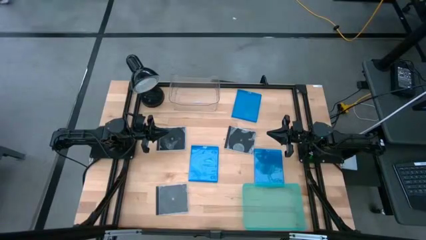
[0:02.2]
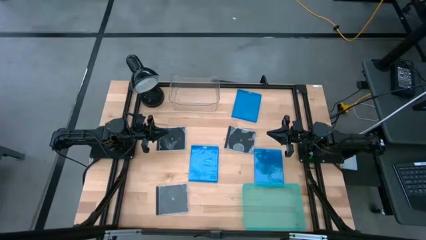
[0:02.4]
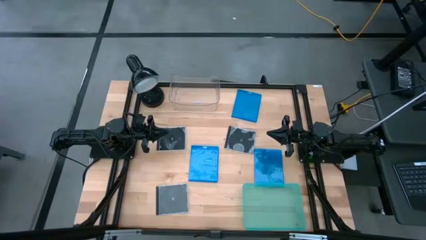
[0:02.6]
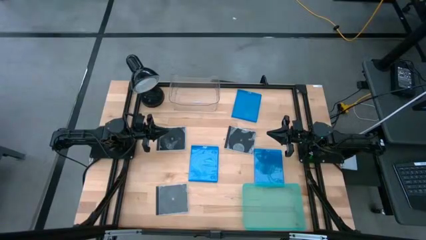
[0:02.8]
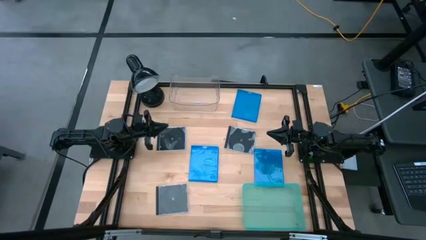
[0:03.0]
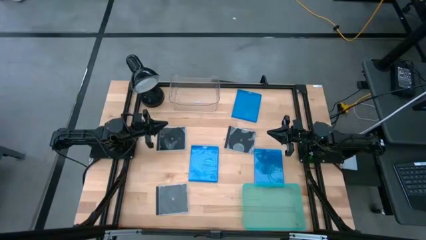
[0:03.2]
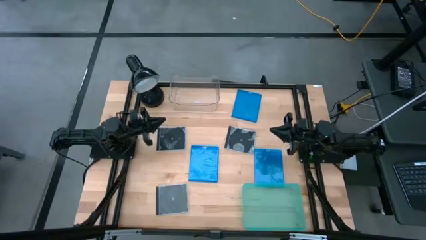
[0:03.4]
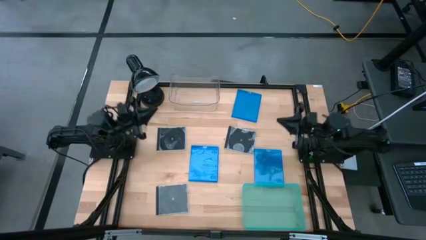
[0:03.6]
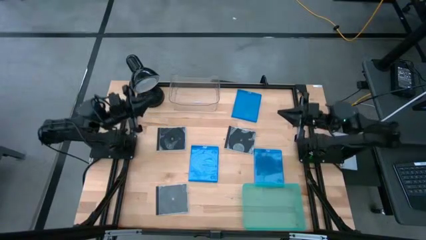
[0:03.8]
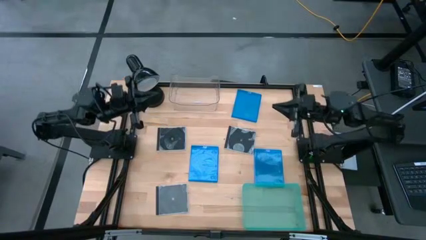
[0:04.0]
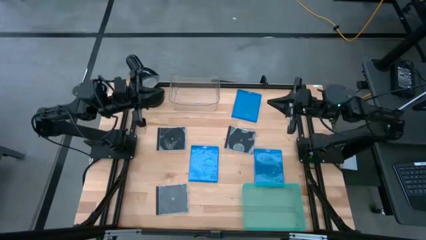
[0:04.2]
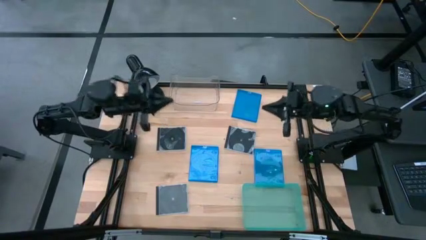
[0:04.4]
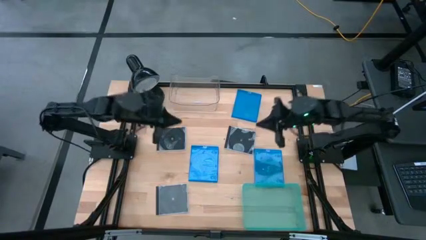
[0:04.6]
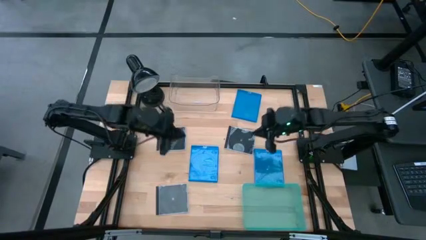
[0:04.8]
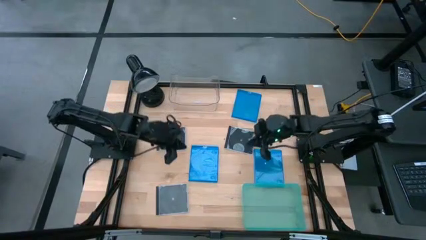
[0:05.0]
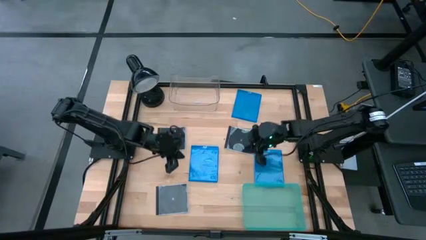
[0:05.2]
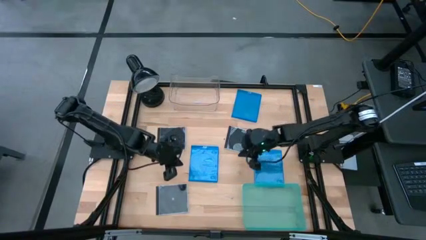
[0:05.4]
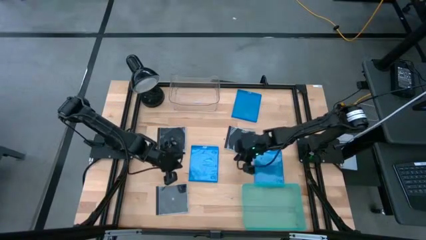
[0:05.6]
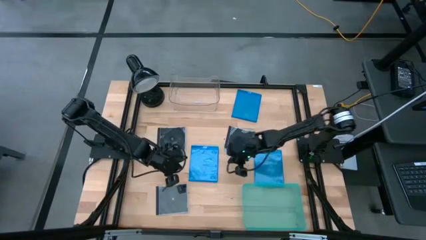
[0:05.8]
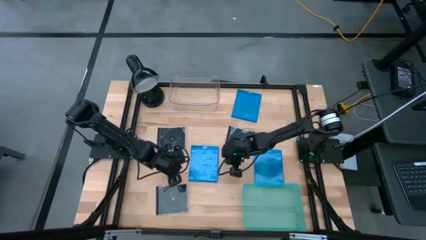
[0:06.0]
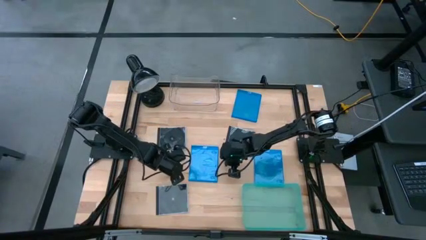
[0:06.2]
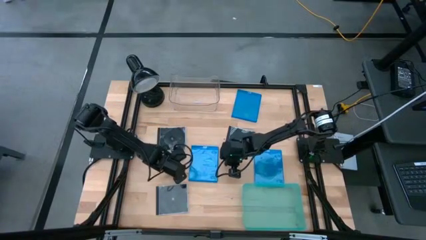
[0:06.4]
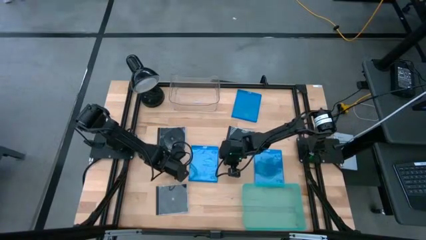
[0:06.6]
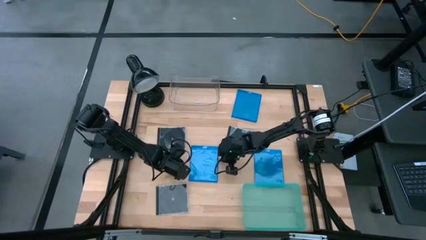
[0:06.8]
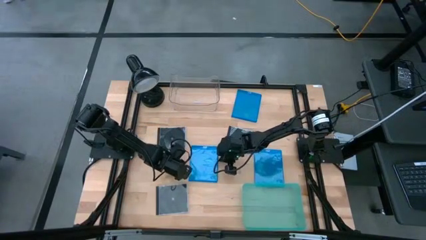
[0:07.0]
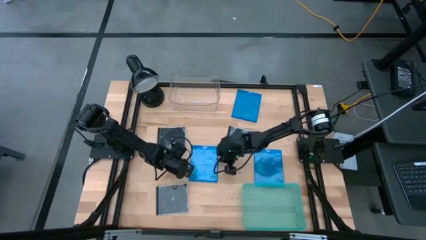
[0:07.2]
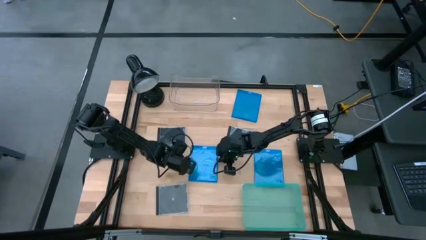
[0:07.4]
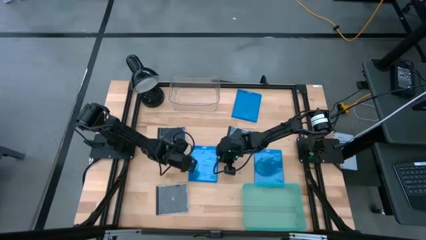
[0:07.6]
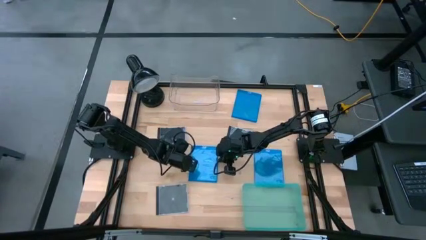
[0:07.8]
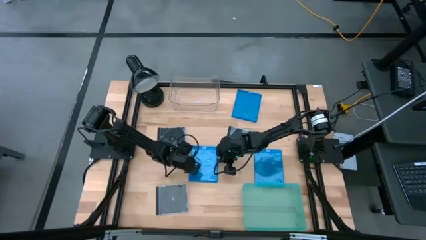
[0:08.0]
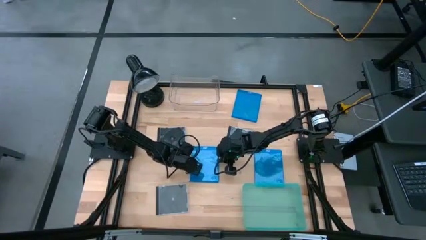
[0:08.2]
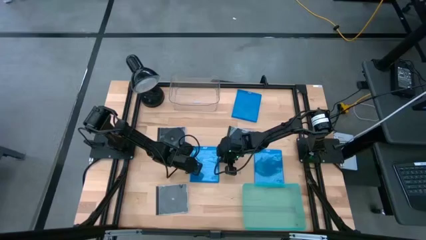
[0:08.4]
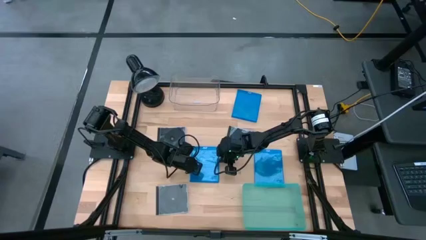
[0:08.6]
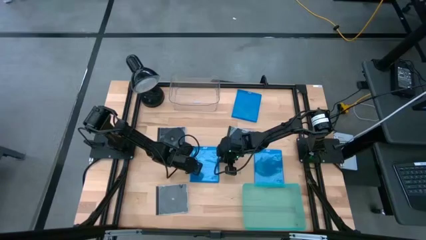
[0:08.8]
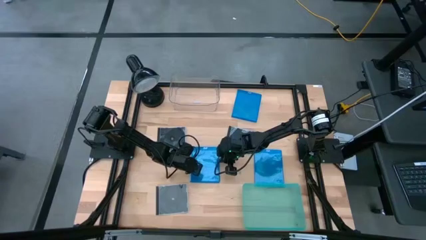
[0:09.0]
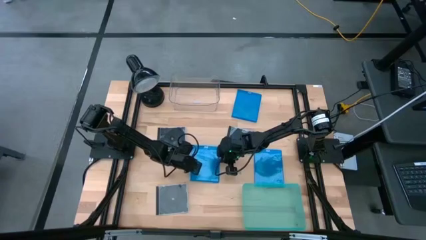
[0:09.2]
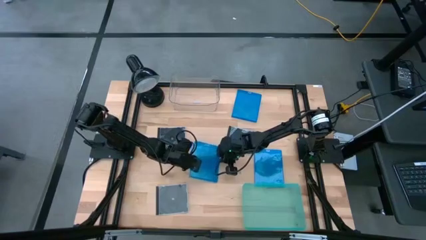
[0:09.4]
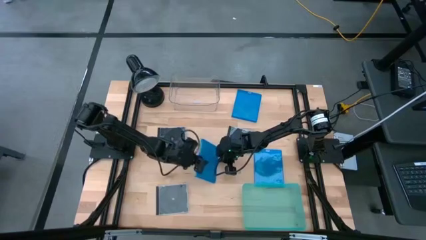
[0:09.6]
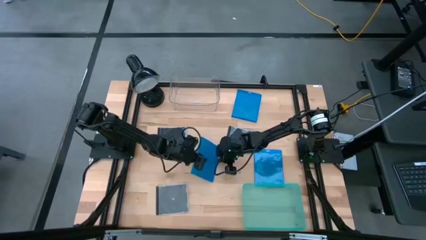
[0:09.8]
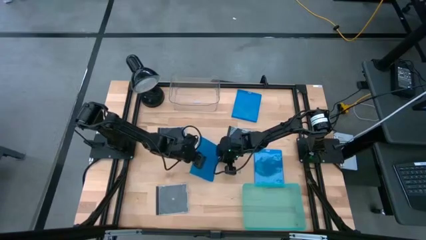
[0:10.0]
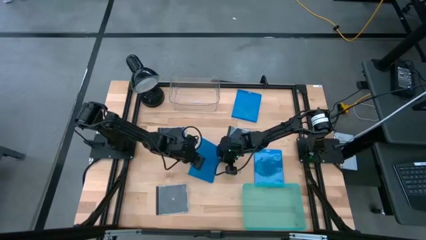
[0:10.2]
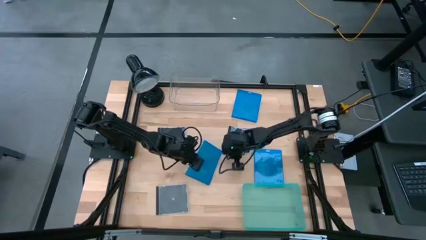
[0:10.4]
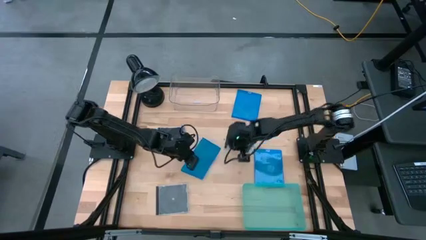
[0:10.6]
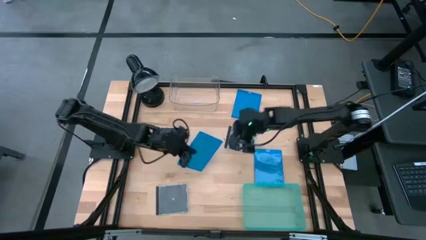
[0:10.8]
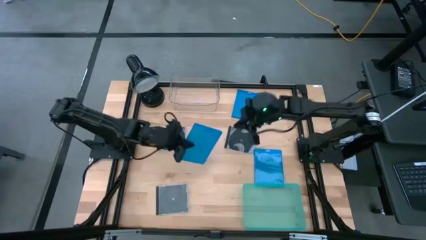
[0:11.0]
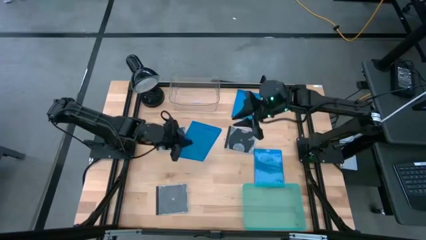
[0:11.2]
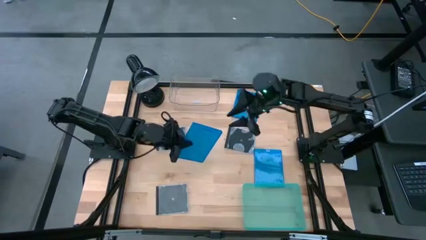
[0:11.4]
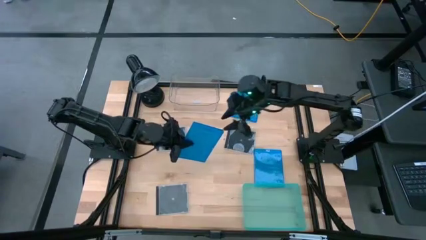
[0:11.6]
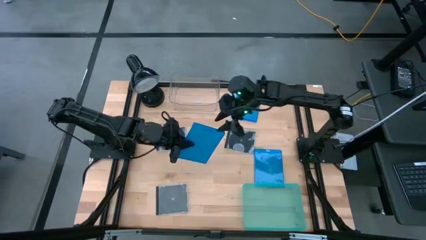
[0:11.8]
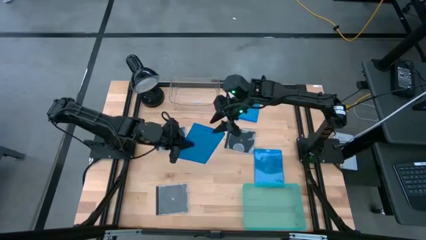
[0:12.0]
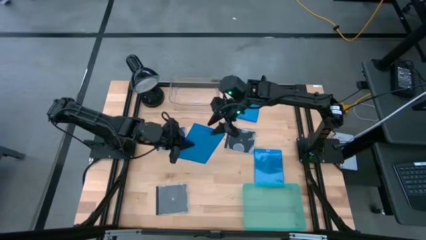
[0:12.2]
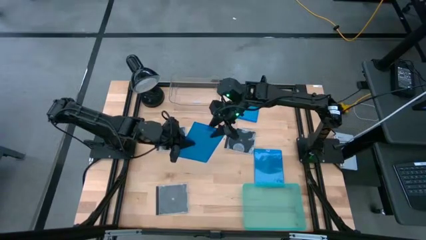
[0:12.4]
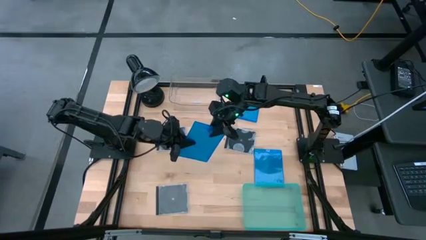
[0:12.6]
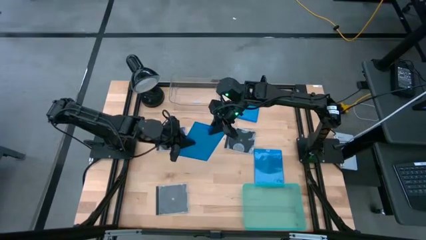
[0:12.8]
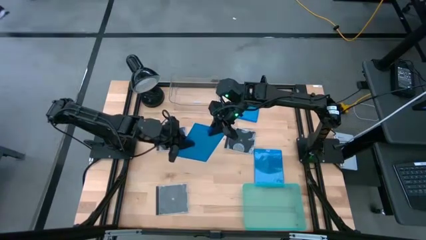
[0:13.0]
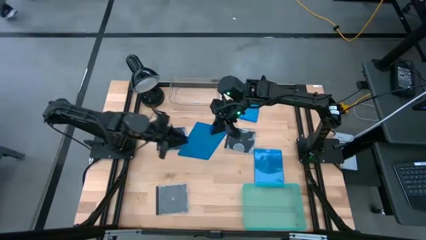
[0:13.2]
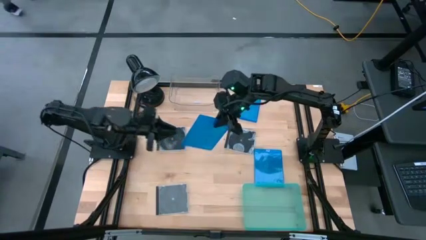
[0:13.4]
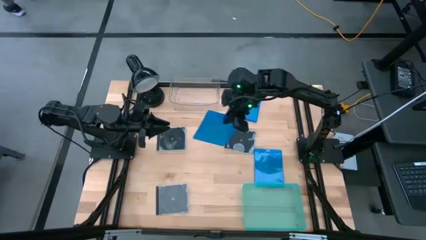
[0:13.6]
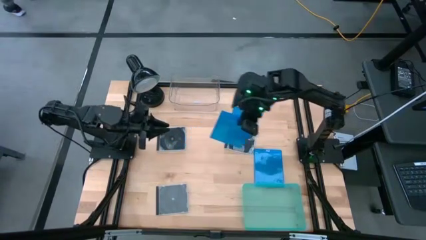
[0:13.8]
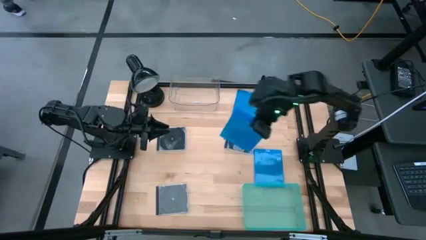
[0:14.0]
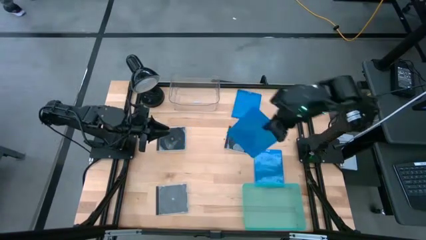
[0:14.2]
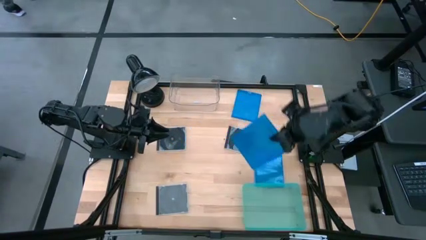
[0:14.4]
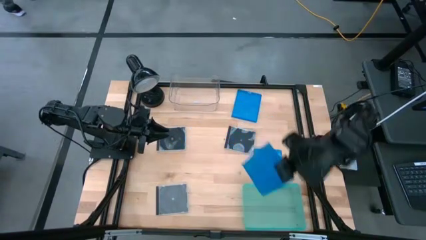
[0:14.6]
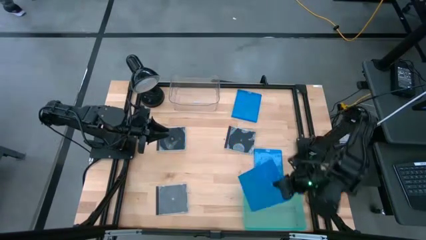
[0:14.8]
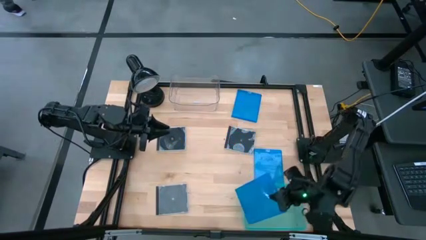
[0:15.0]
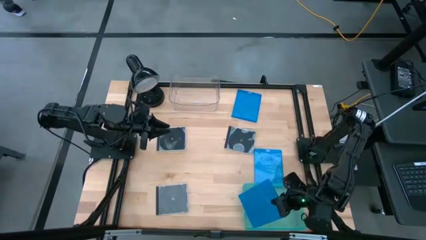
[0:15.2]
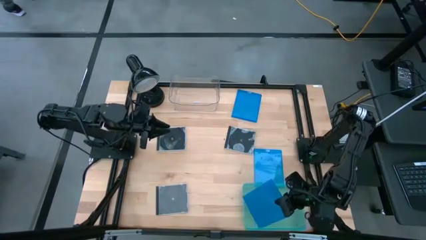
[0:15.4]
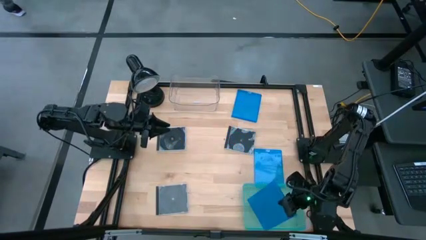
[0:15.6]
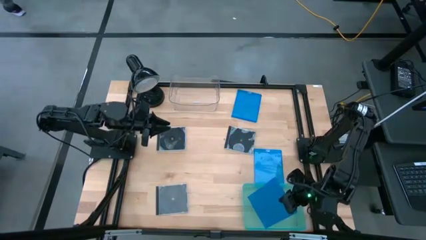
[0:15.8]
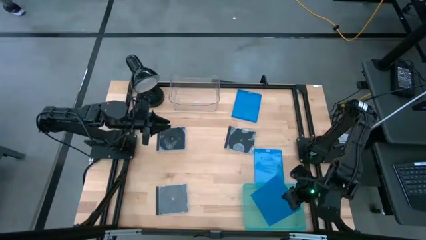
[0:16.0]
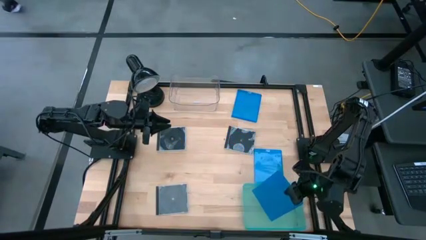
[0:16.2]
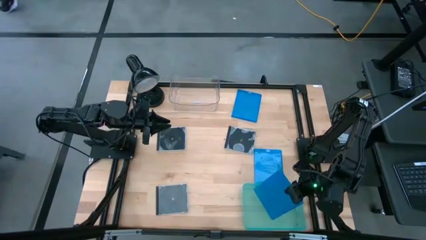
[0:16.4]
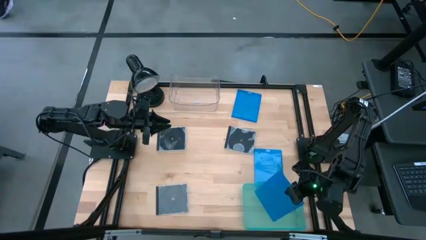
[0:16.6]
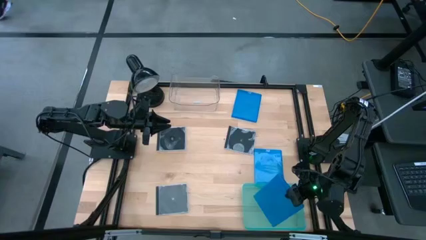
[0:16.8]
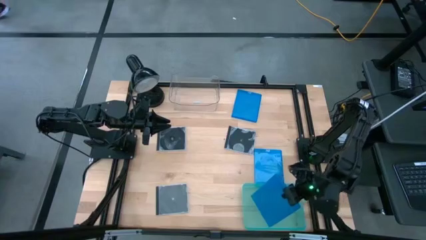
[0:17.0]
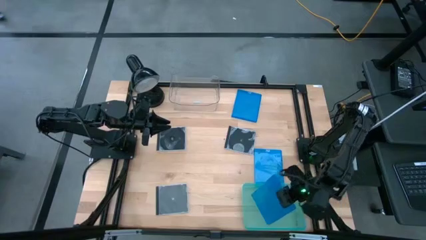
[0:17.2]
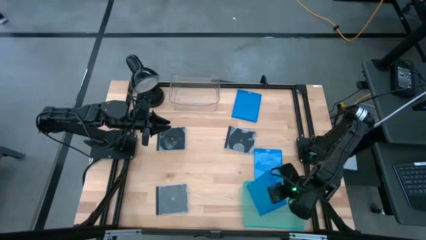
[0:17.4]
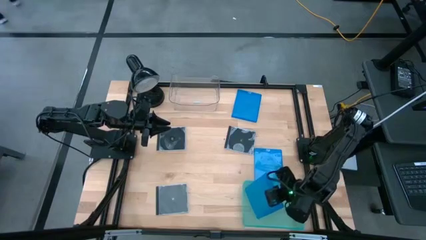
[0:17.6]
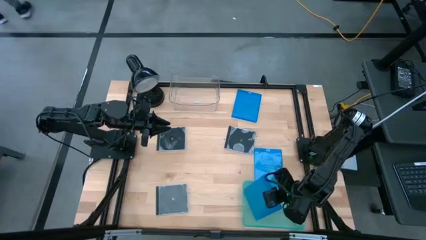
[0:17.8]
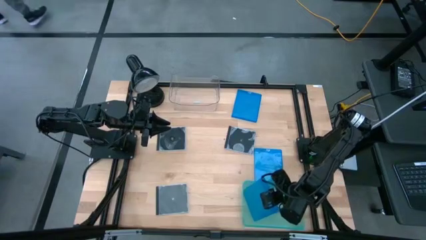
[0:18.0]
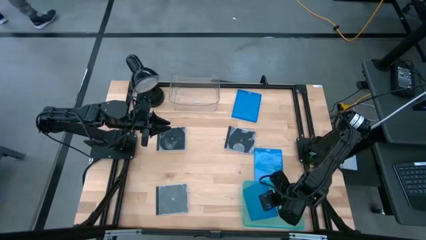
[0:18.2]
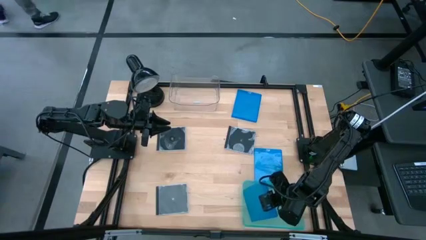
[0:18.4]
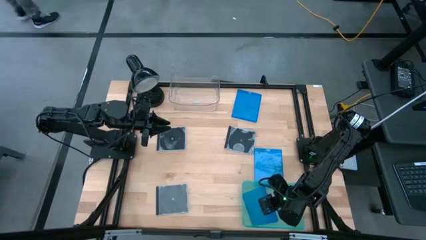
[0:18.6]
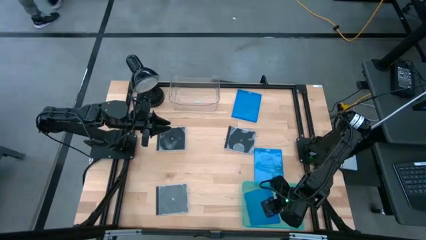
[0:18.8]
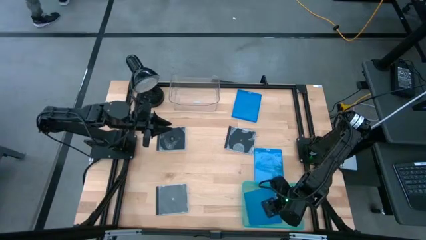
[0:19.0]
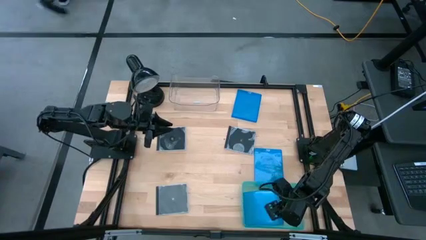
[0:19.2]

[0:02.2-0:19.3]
Task: Pick & place jewel cases by type
Put the bottom left blue cd case into the green bin
